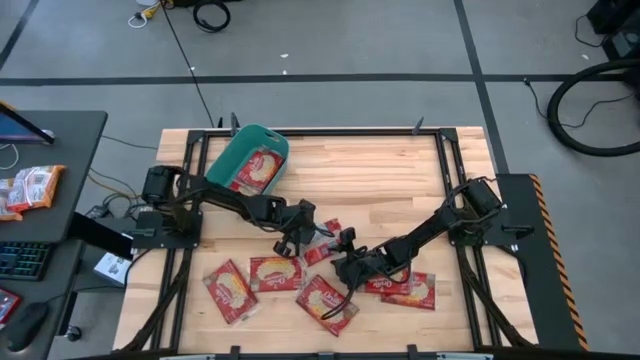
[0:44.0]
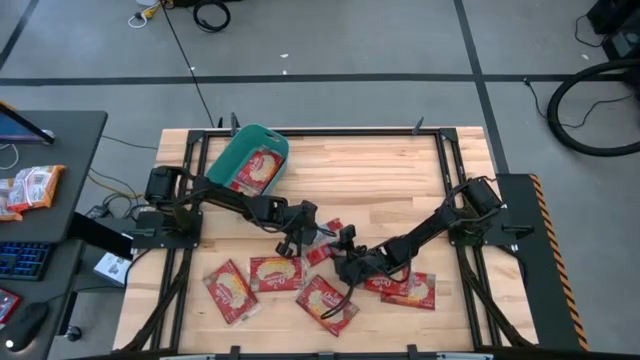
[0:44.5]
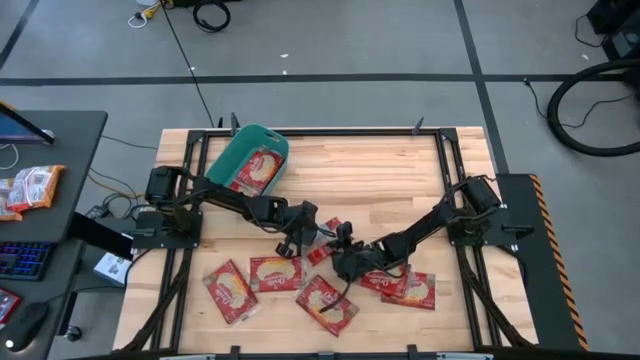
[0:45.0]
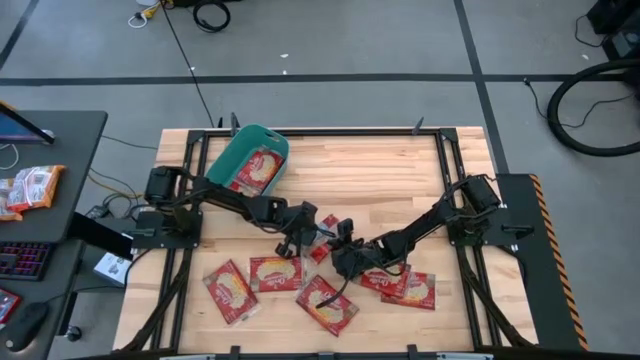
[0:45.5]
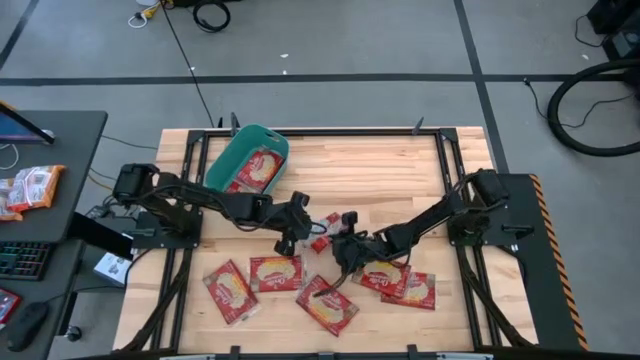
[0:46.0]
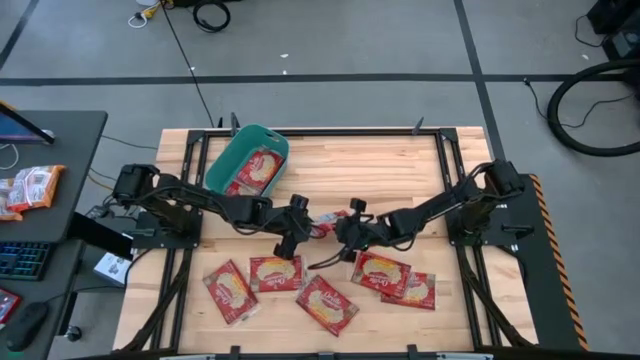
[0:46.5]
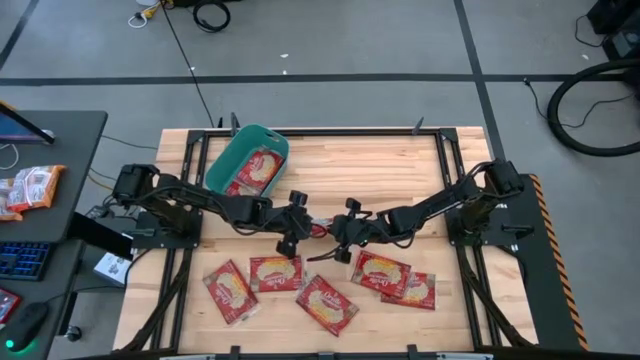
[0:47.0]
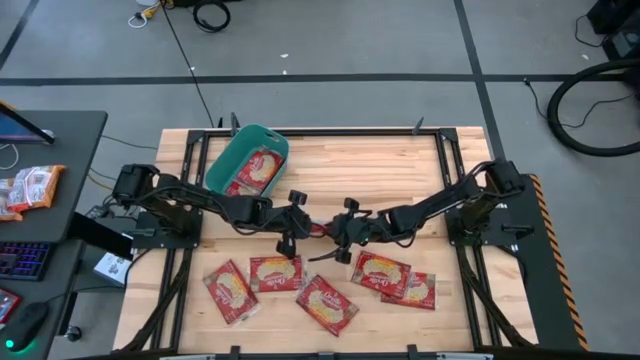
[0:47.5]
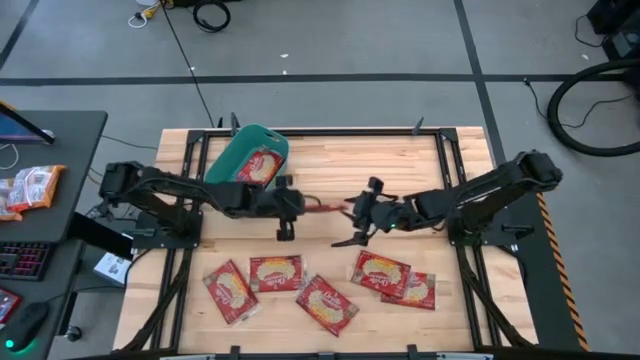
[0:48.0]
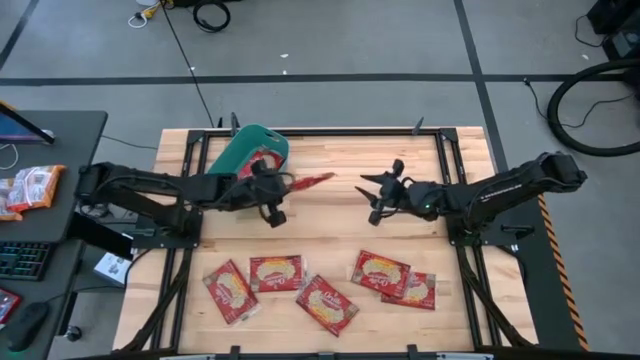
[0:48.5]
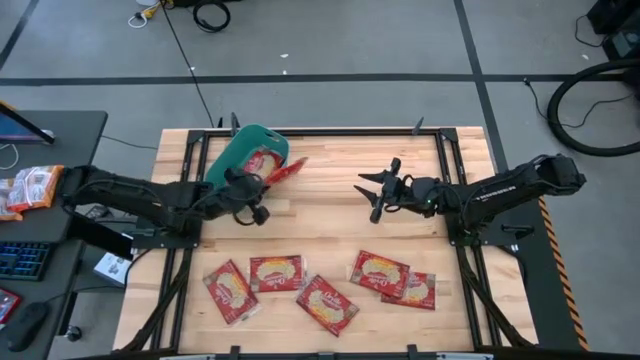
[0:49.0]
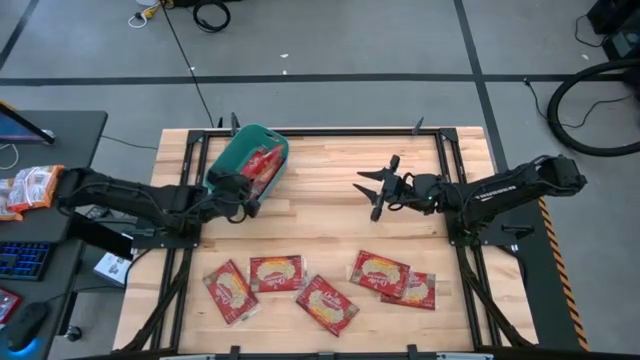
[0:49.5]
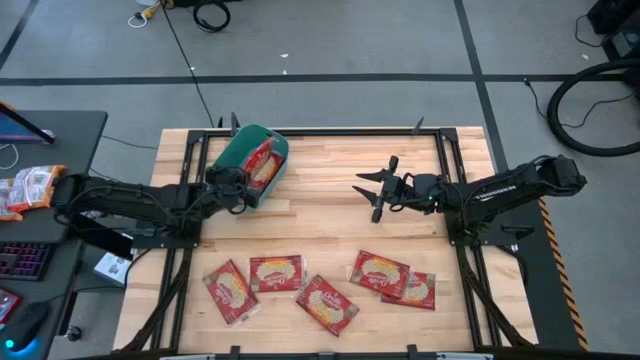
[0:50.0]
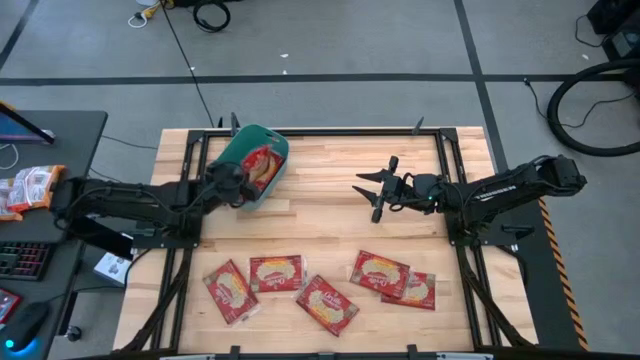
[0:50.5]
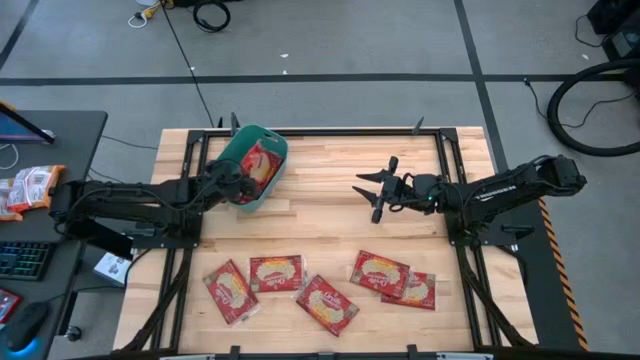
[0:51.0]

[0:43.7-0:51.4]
Task: Sort popcorn bags into baskets
Put the red popcorn bag into the green bin

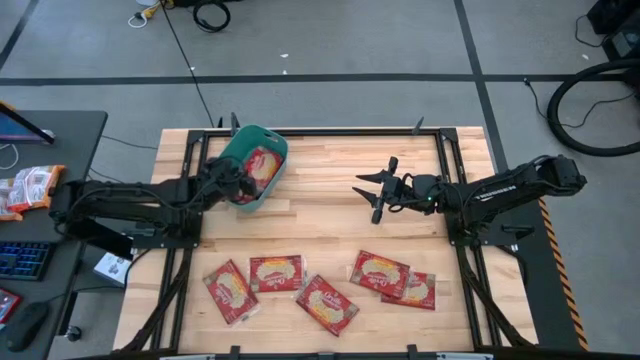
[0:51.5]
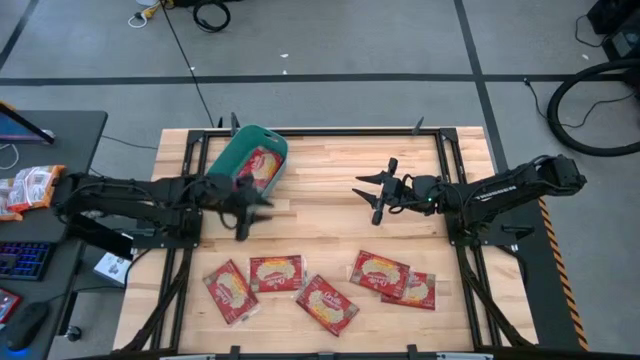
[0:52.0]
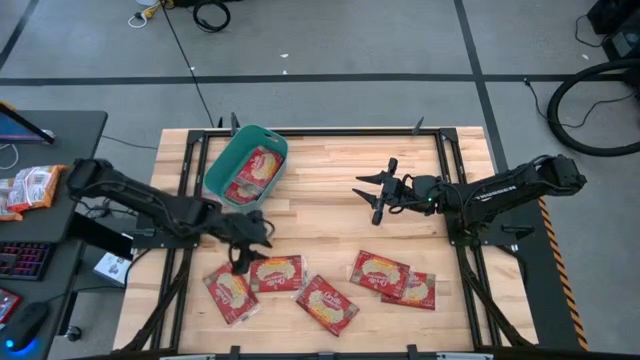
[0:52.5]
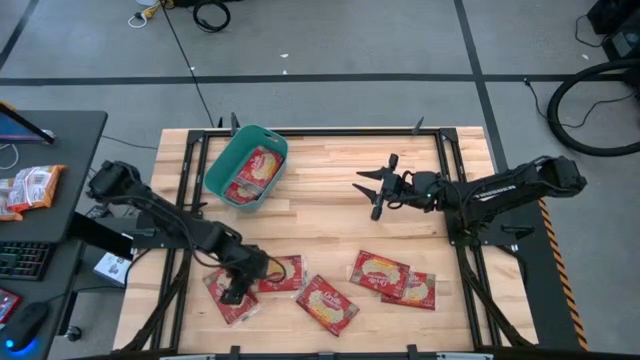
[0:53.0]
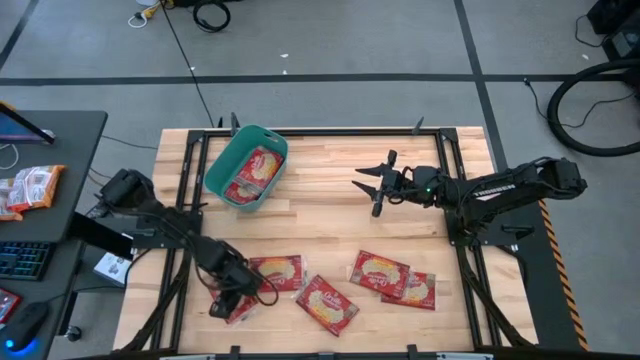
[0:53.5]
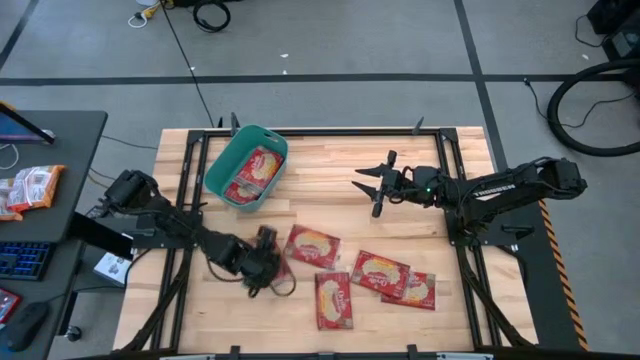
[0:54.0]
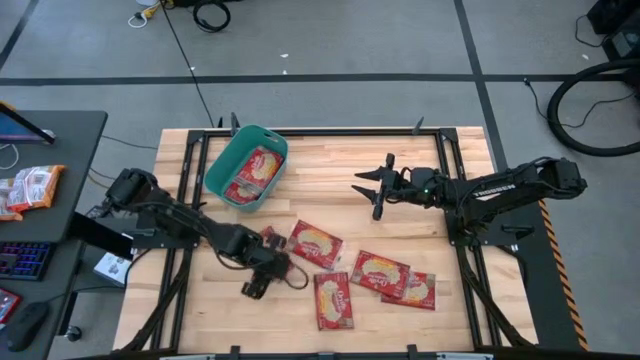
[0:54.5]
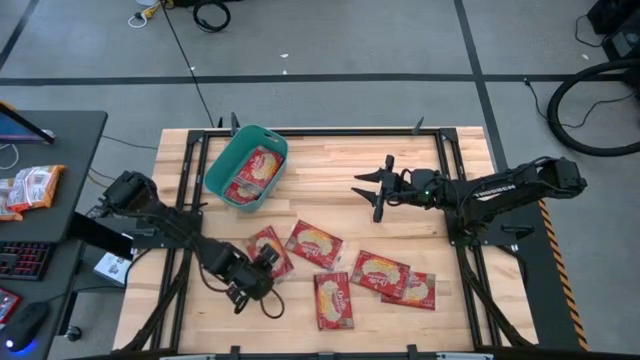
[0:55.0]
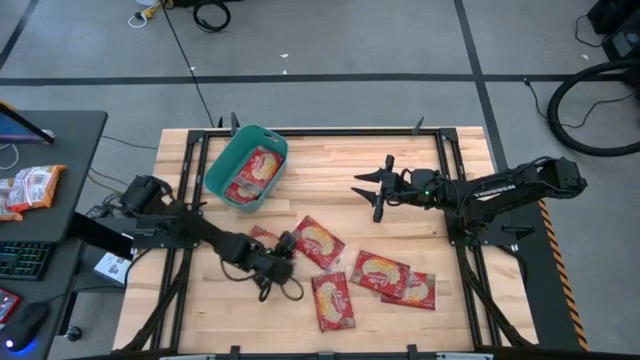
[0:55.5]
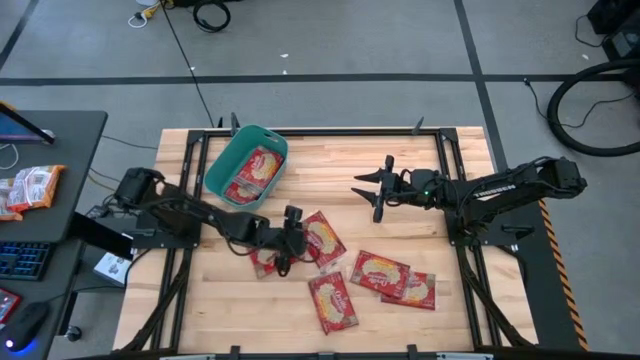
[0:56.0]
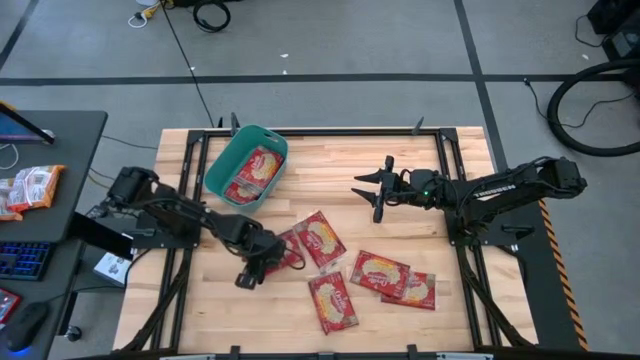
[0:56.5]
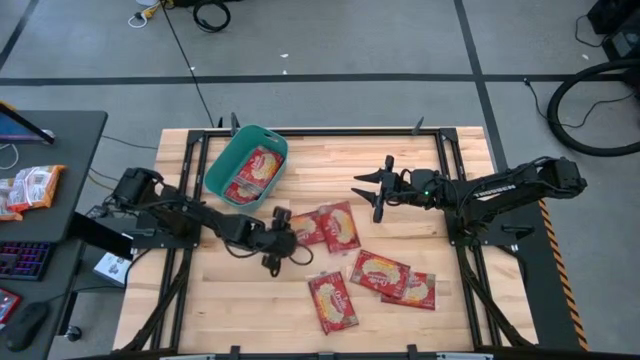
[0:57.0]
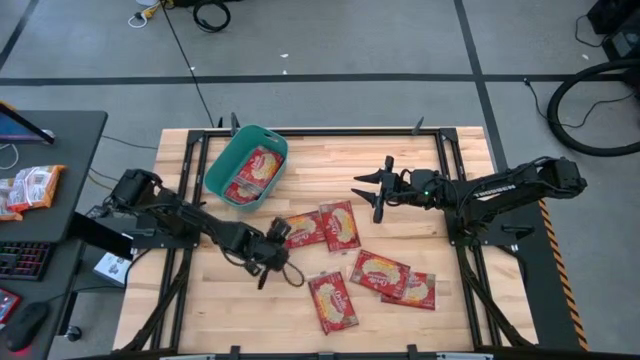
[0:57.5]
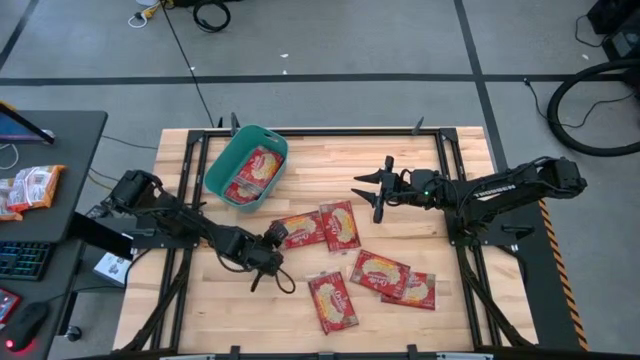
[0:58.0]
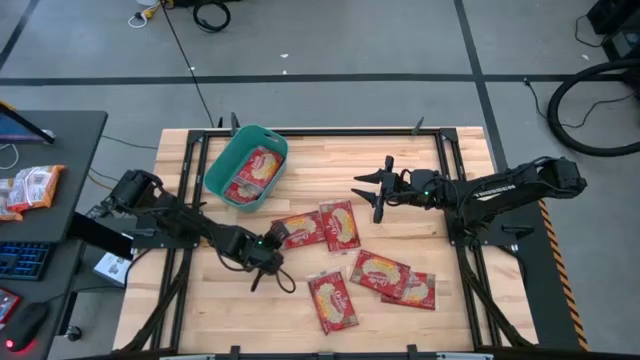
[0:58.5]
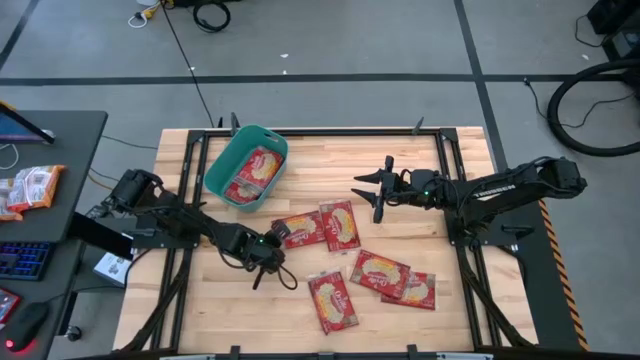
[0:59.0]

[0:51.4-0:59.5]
Put the red popcorn bag into the green bin

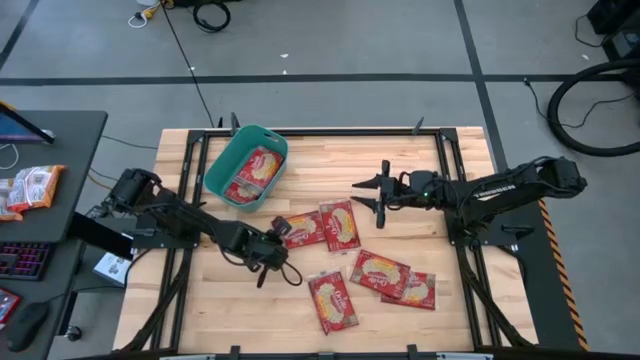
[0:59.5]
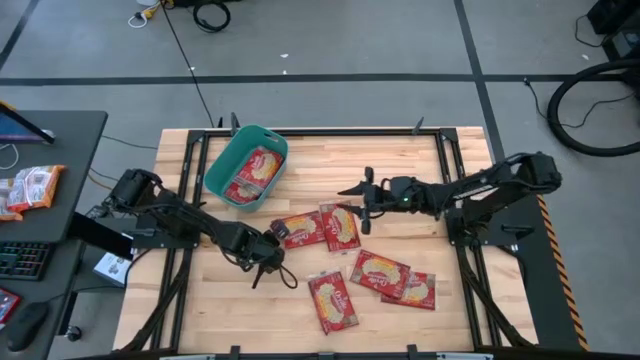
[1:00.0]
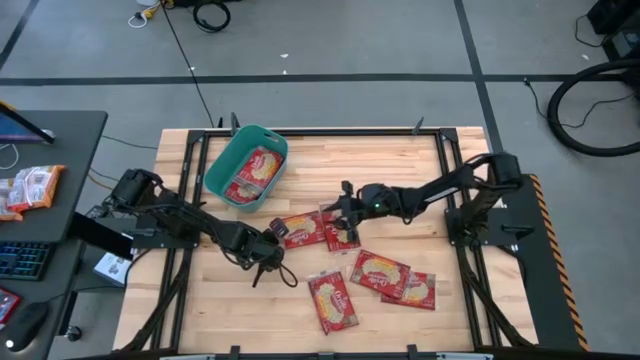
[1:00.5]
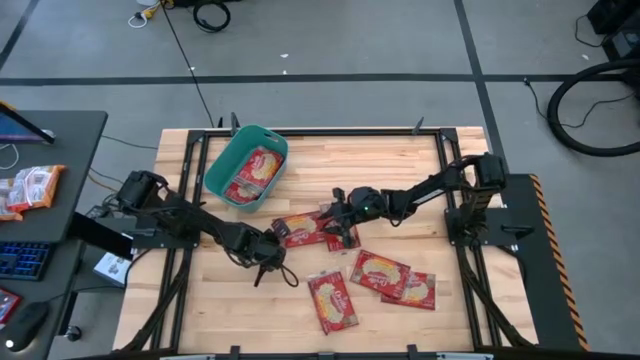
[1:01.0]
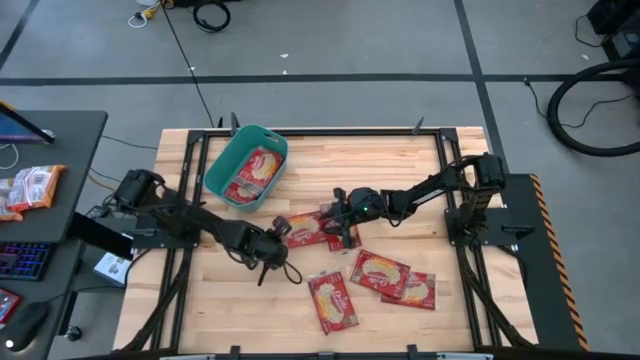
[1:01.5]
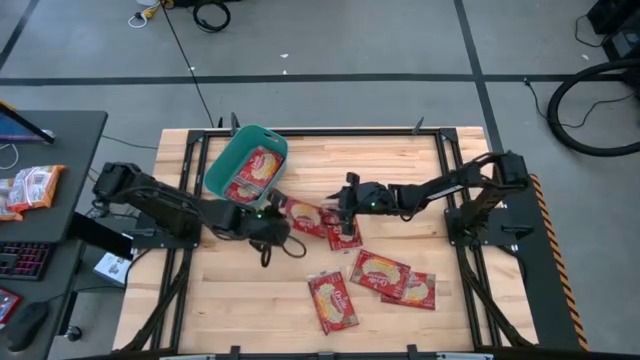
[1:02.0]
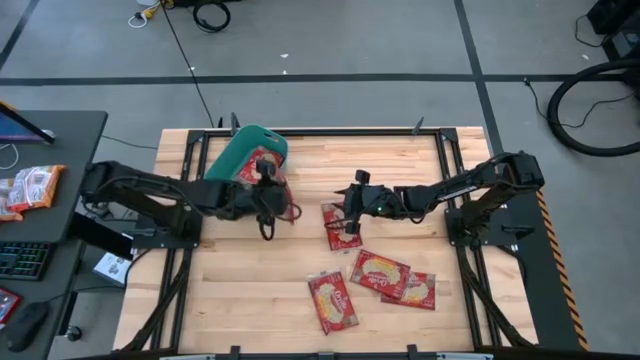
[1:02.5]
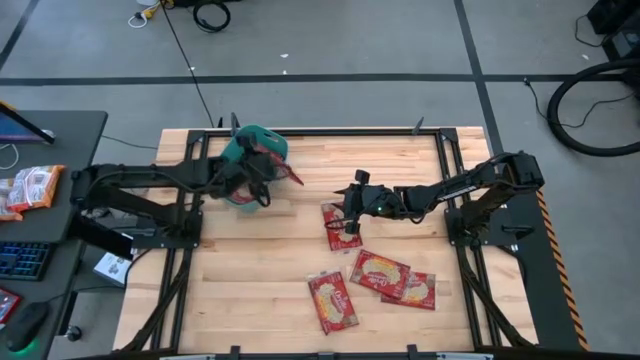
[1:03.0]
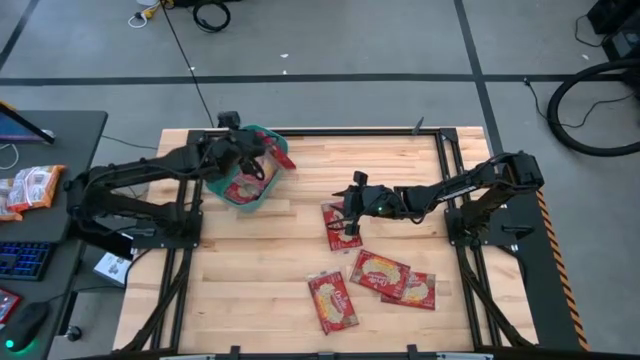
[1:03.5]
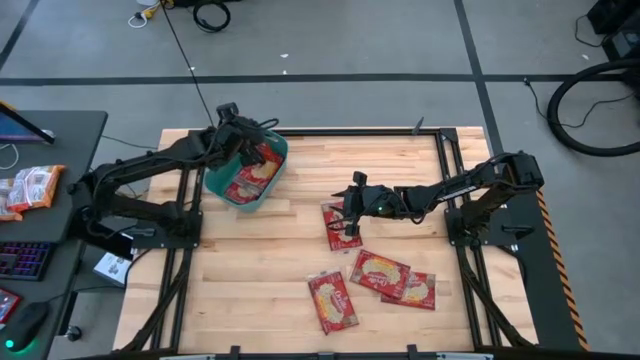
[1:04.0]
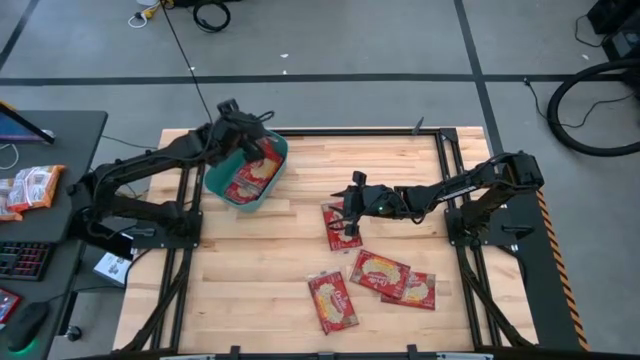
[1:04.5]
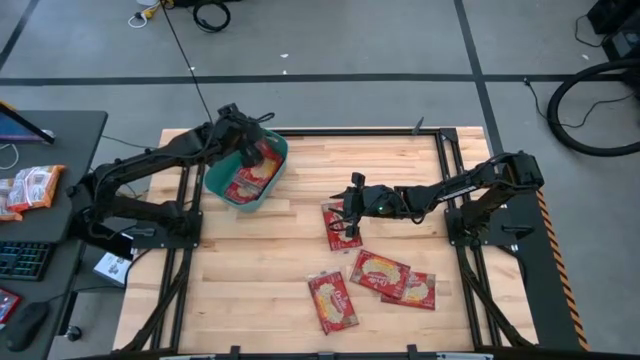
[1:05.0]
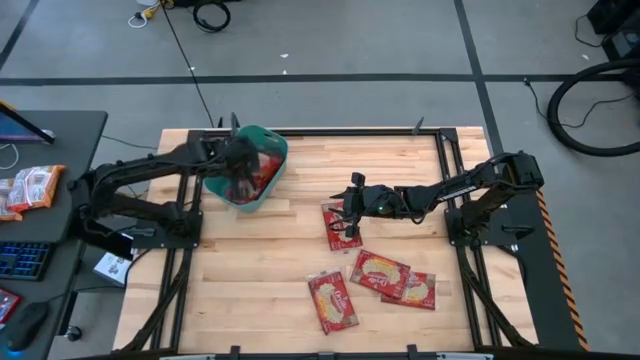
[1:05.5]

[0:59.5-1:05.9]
Put the red popcorn bag into the green bin
